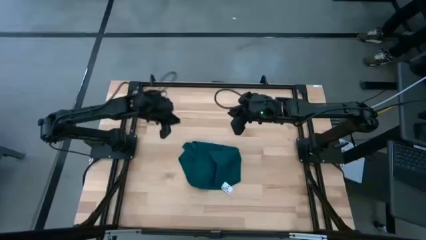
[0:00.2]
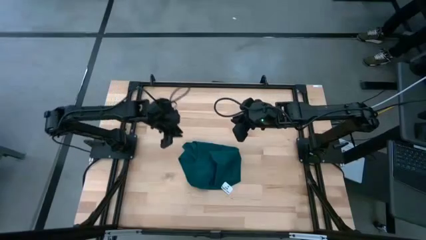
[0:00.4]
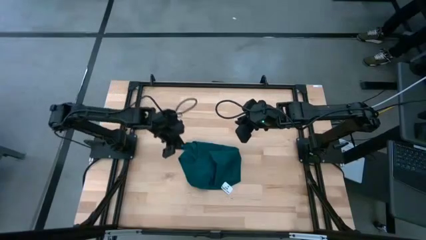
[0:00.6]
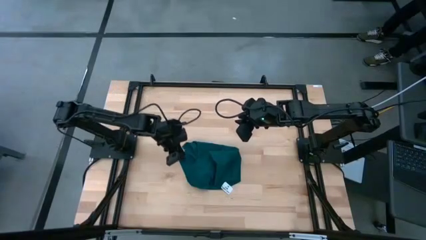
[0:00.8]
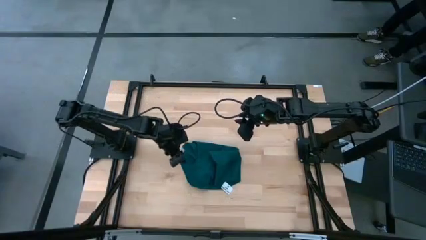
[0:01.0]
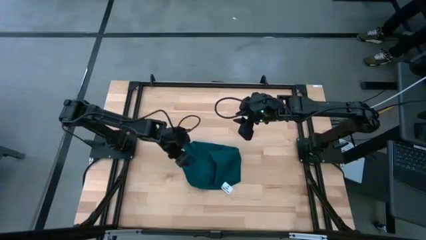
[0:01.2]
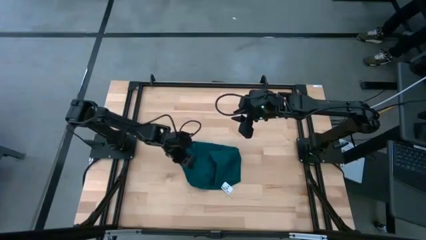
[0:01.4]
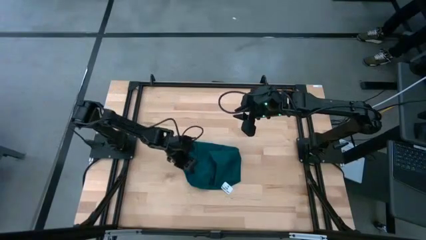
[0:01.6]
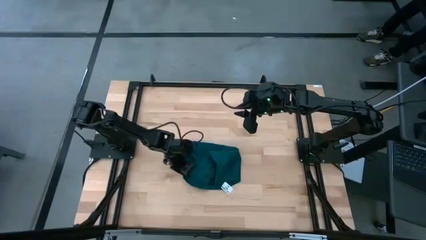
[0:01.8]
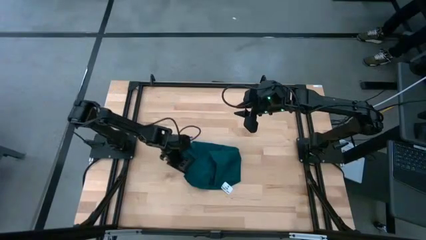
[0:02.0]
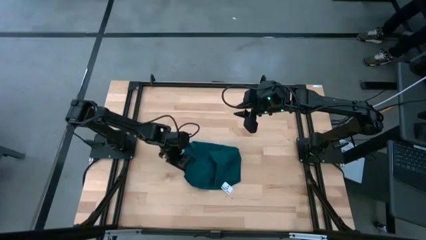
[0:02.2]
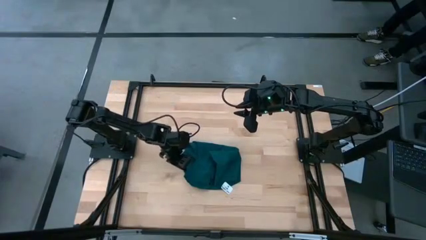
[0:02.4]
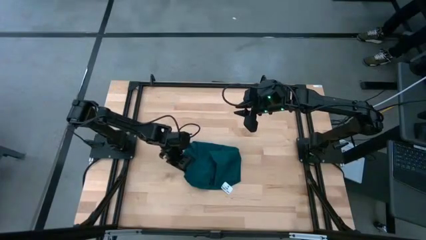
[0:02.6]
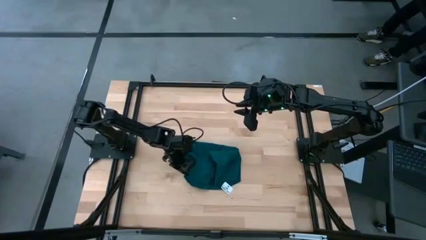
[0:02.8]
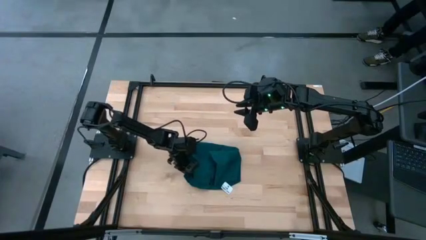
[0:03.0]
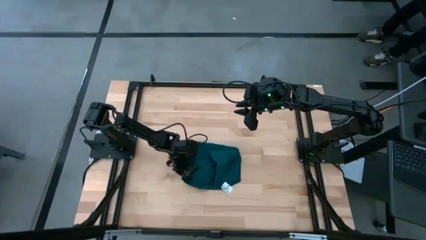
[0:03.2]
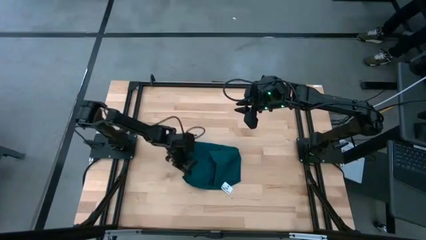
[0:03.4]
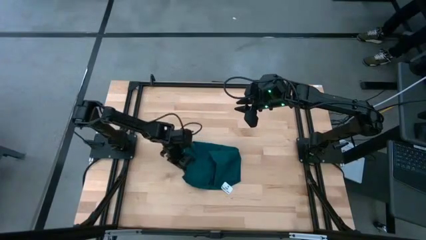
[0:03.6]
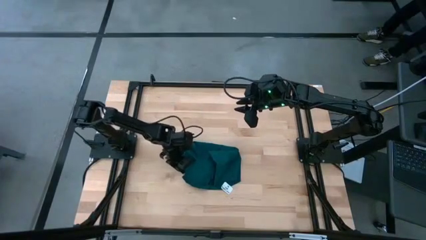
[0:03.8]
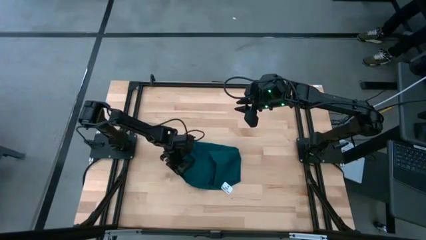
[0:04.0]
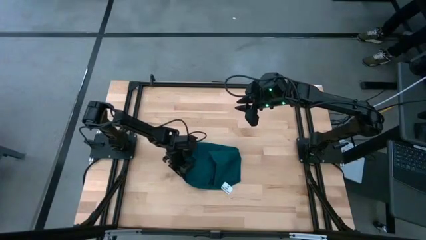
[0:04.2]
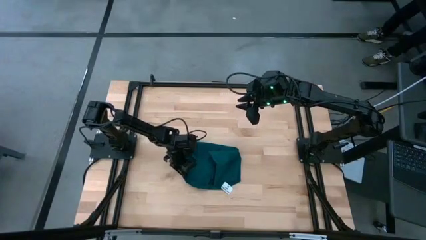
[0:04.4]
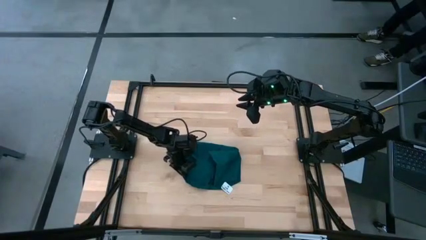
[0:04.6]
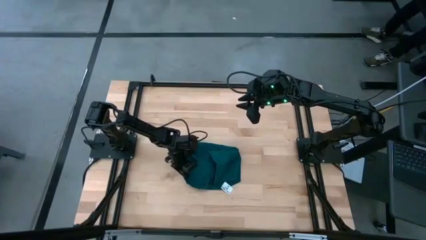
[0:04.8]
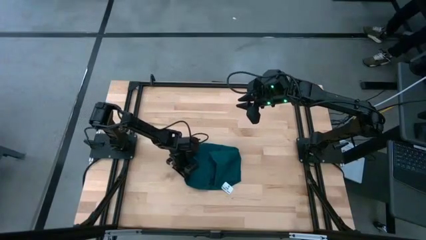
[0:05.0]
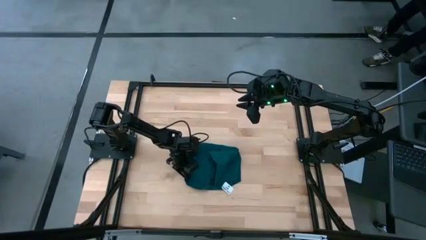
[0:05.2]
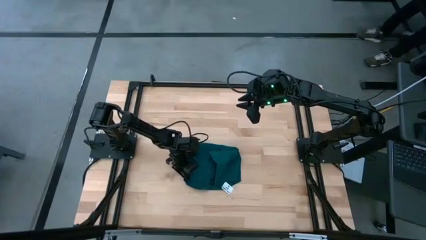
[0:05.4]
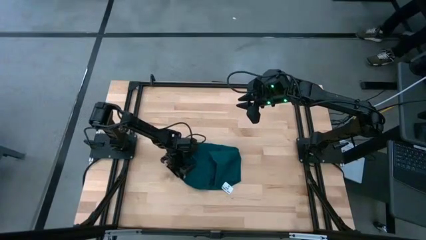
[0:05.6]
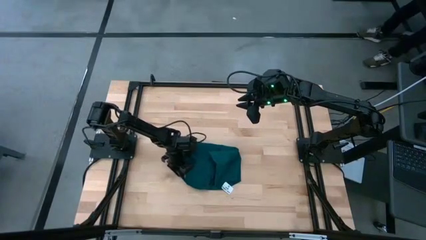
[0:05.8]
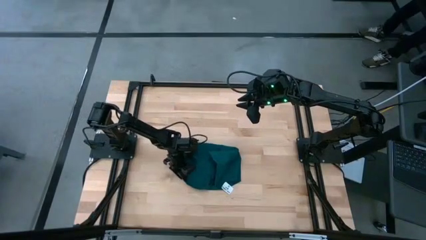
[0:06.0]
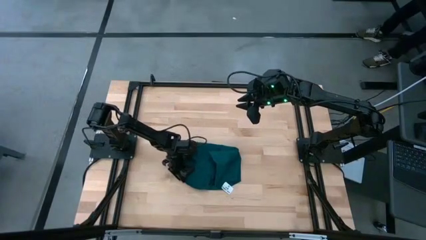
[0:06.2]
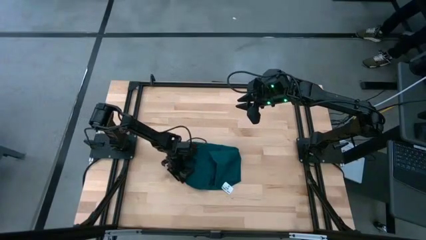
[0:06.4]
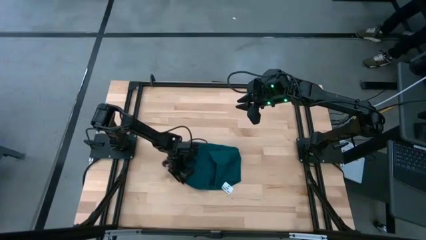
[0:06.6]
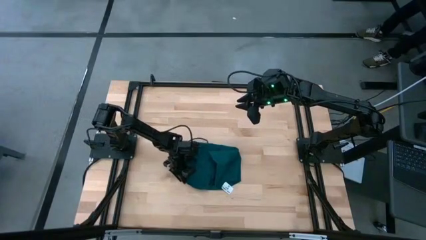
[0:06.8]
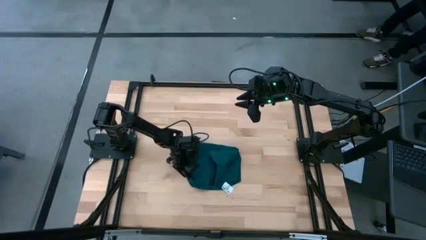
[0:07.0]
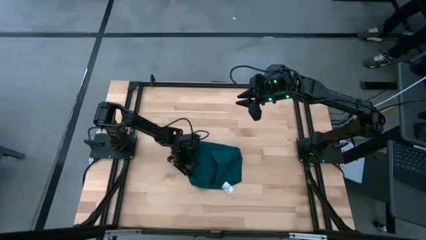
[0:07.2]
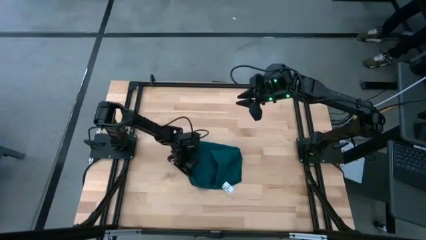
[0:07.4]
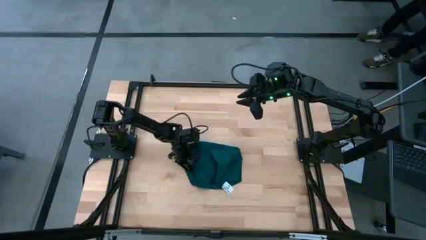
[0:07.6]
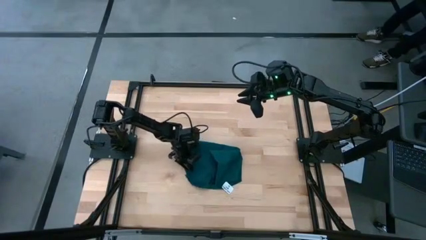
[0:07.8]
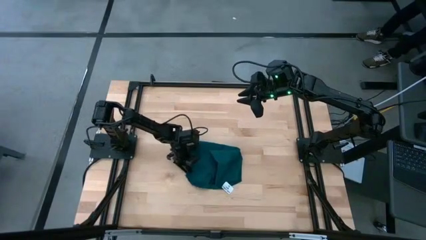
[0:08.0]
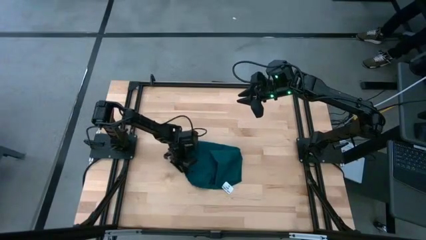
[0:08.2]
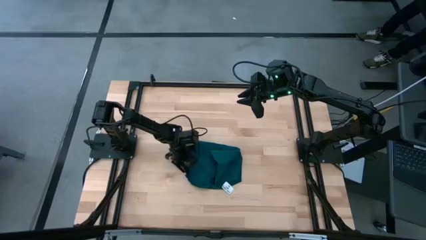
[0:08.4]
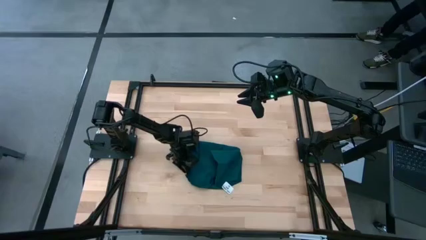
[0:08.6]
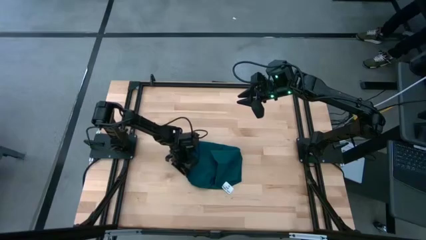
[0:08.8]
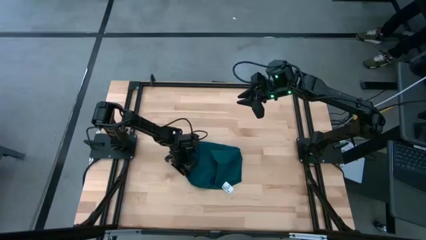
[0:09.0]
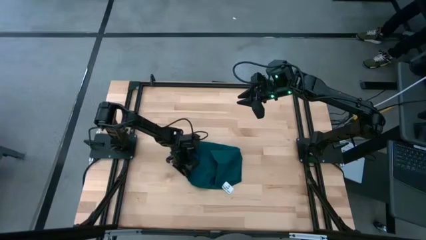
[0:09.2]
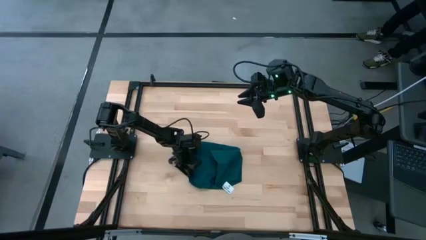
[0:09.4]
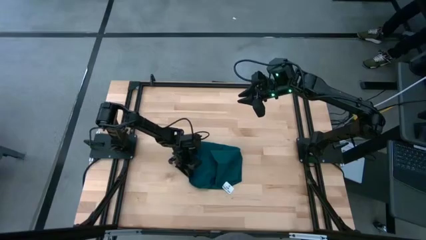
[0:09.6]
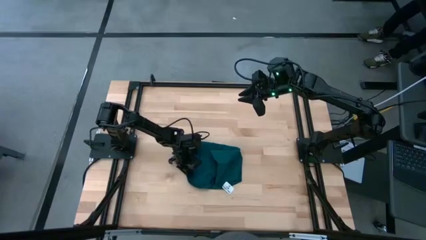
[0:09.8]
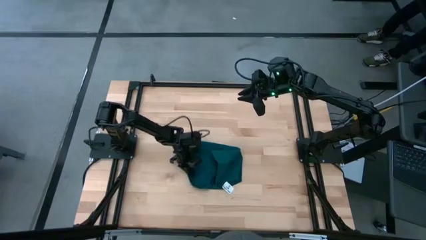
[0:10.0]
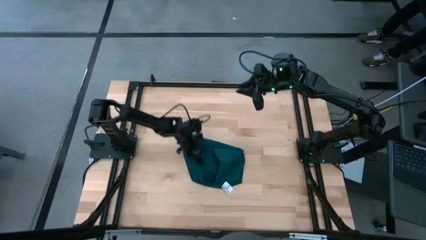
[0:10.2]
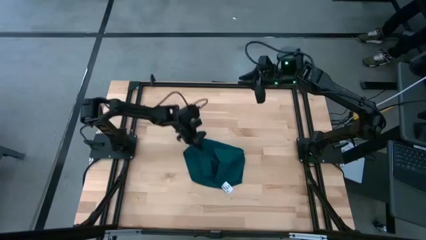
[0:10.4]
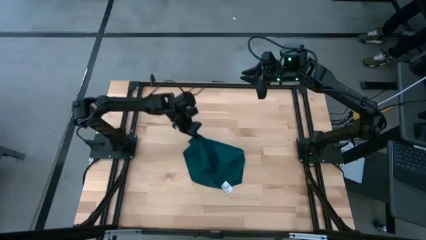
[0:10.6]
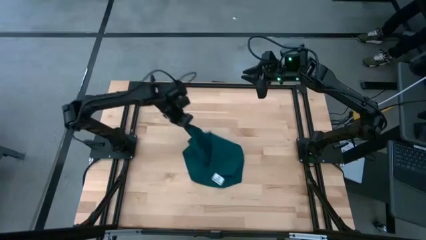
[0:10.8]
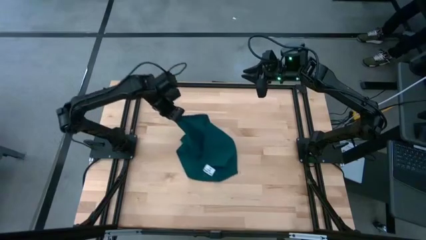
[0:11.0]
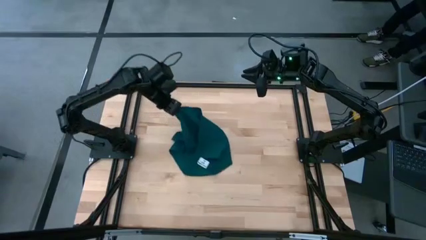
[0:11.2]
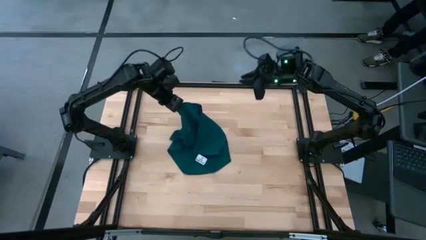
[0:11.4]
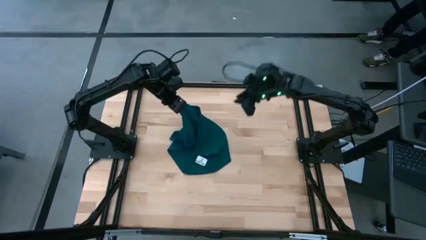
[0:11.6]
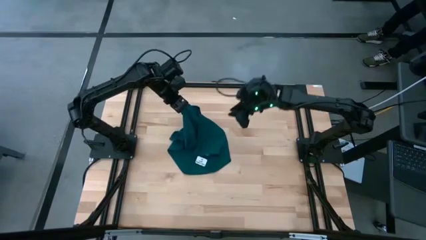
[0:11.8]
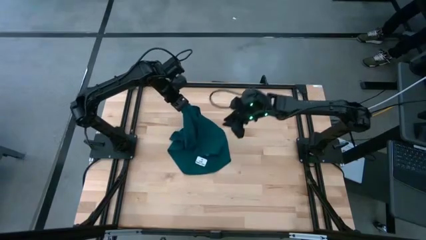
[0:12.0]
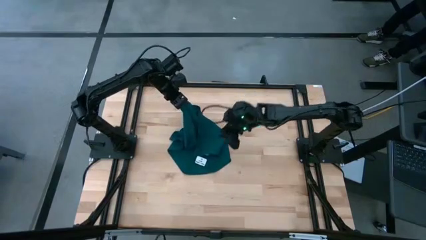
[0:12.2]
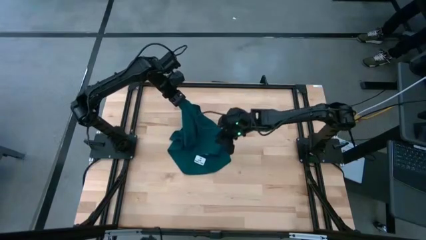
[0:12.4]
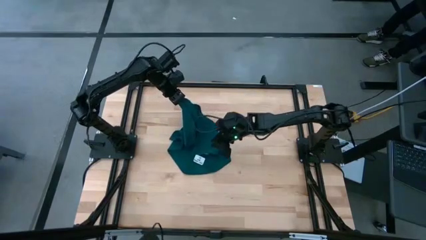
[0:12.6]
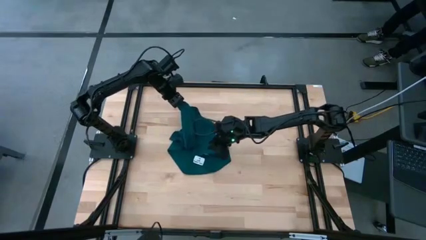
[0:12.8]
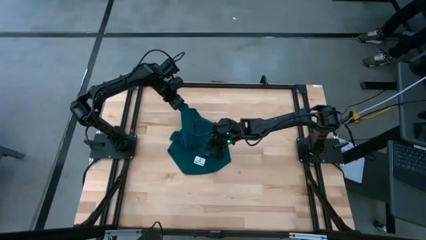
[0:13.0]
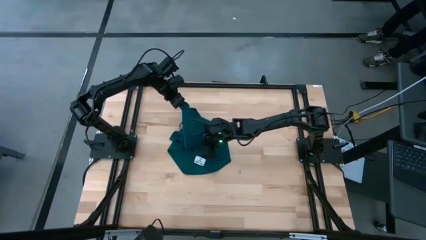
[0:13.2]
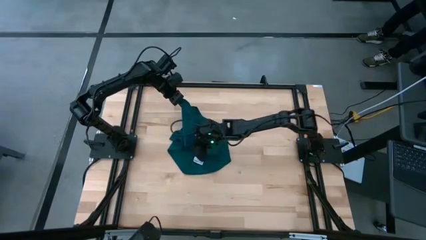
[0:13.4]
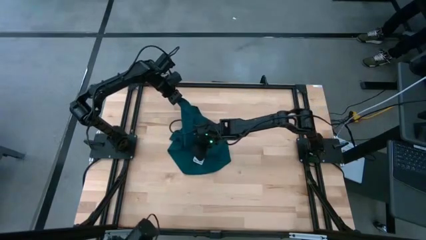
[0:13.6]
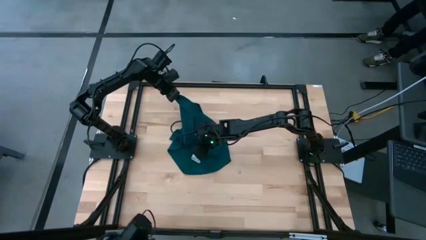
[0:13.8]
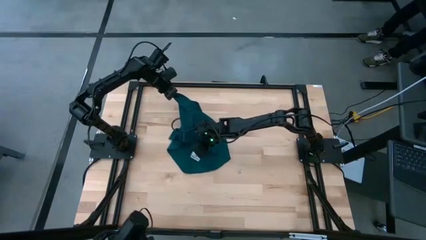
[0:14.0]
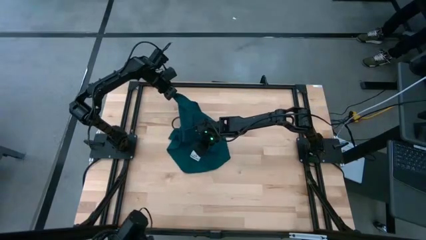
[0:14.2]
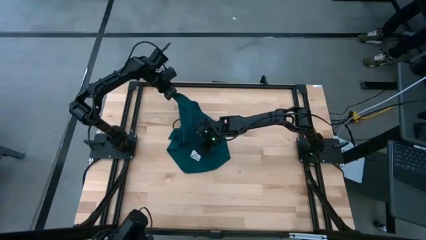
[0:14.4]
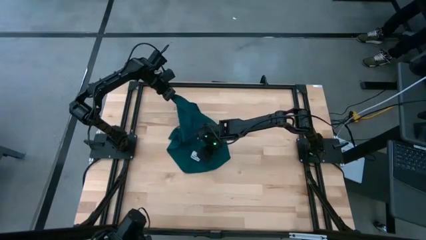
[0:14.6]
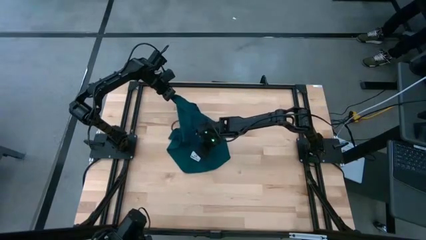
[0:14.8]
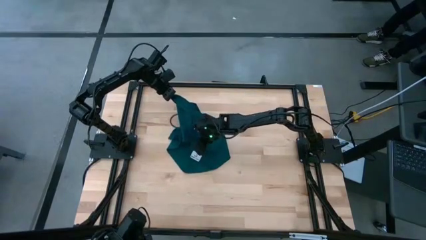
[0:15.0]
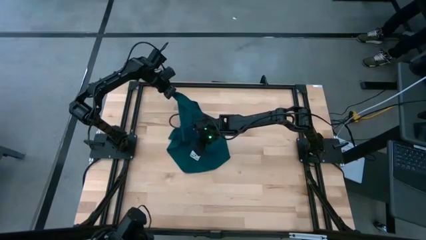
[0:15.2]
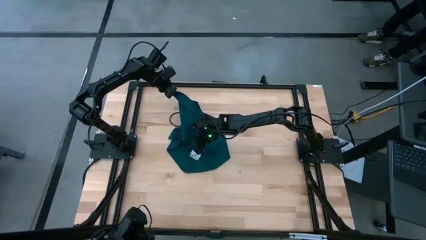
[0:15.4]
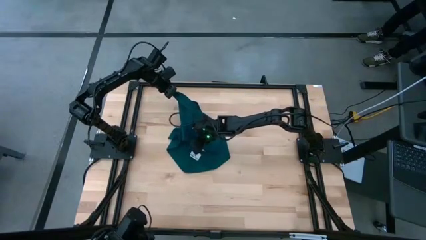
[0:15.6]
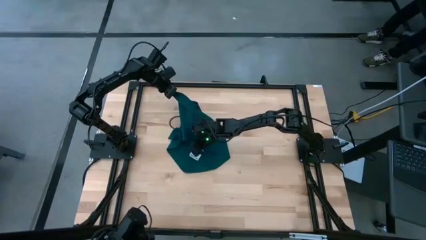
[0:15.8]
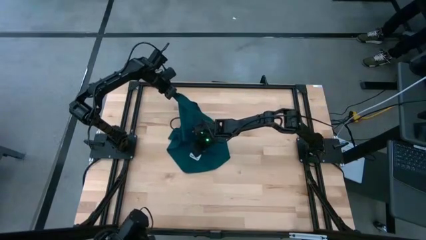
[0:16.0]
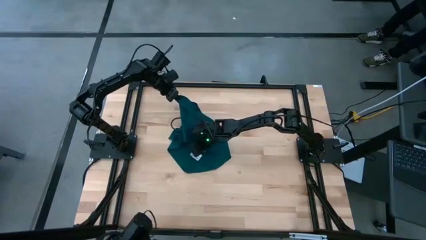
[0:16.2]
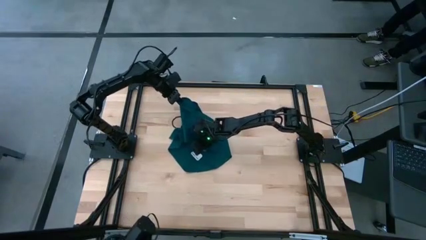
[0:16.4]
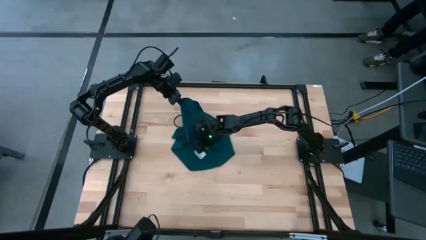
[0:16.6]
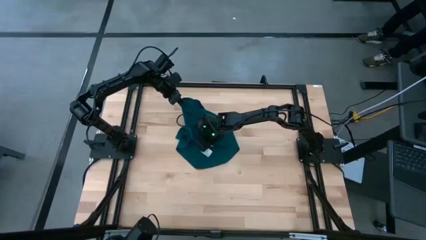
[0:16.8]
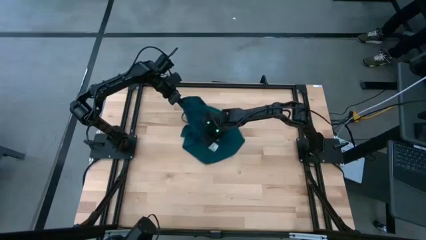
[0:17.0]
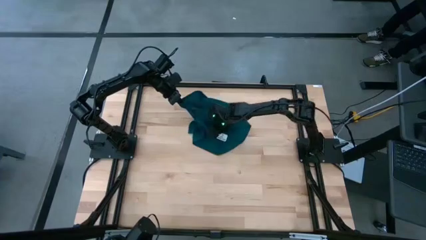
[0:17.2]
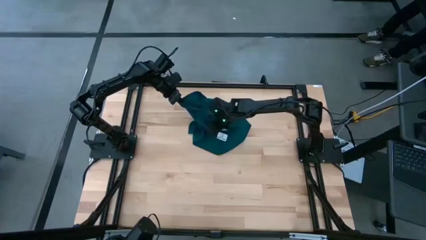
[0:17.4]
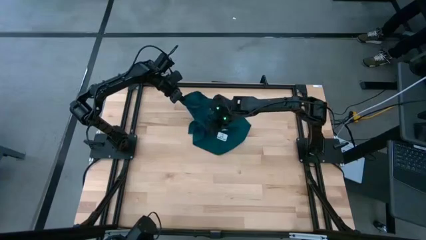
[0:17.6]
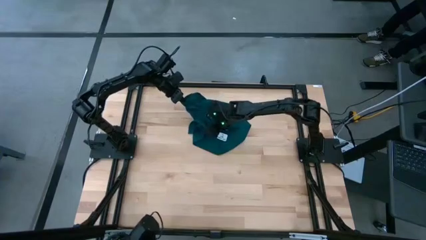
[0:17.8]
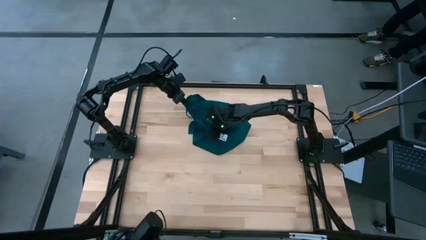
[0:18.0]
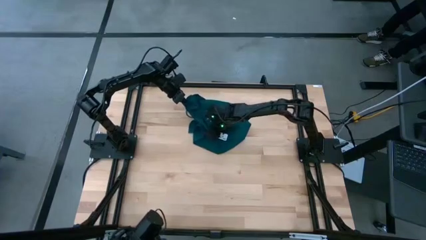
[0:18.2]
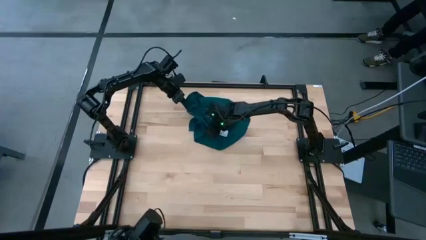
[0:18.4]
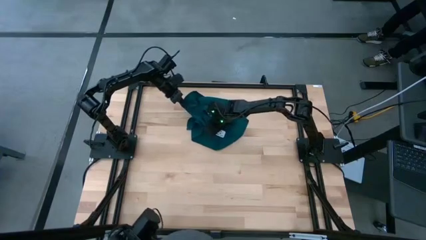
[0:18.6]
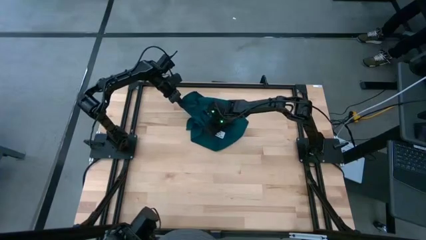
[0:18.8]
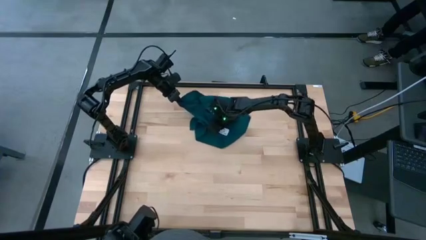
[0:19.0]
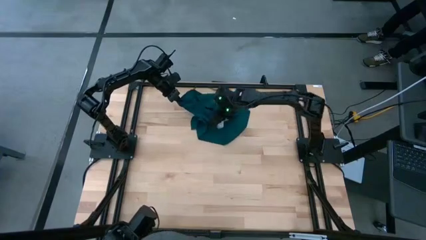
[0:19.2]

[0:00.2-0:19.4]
Task: Fold microfiber towels
Fold the black towel on the table
